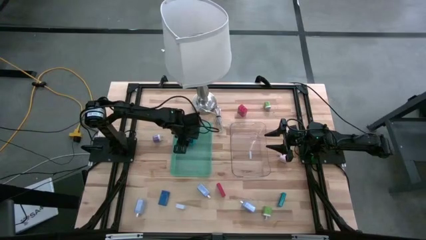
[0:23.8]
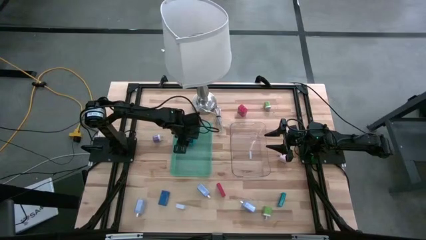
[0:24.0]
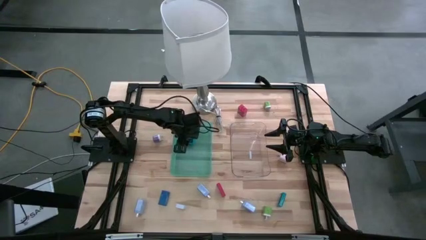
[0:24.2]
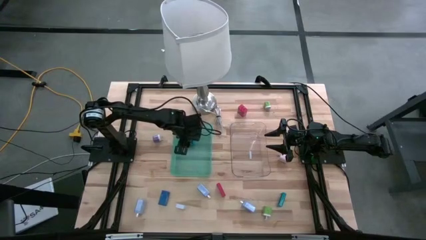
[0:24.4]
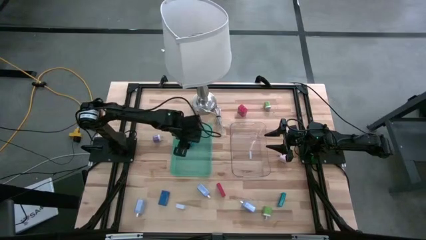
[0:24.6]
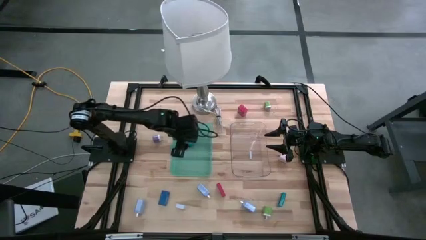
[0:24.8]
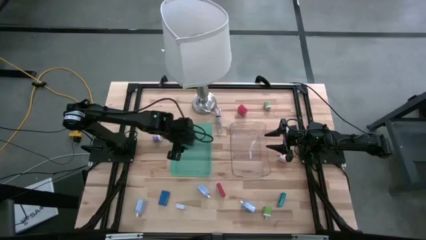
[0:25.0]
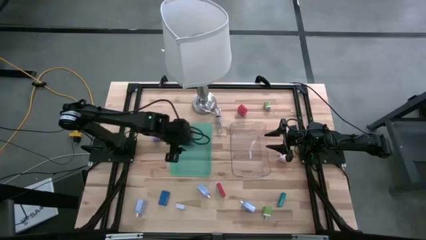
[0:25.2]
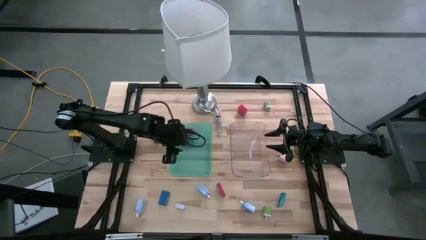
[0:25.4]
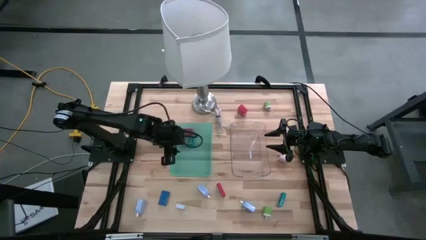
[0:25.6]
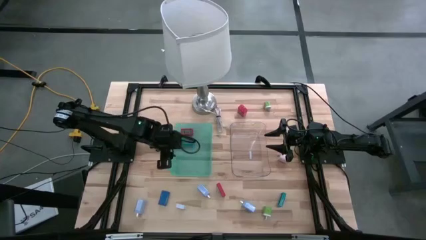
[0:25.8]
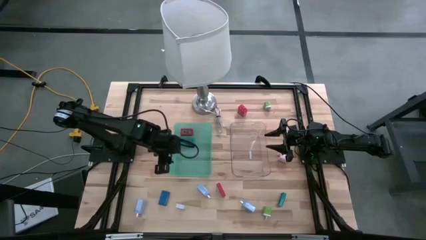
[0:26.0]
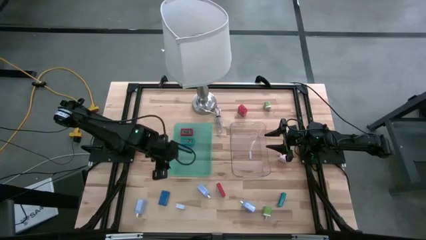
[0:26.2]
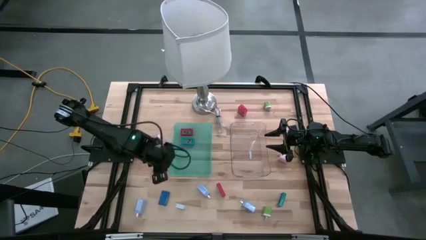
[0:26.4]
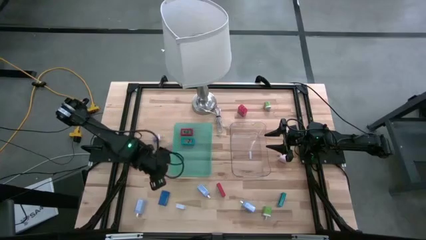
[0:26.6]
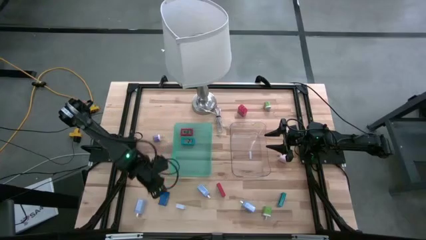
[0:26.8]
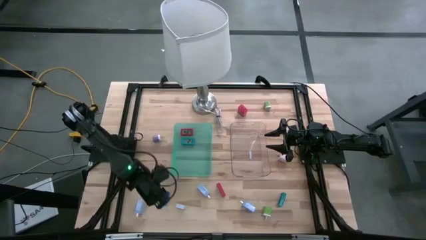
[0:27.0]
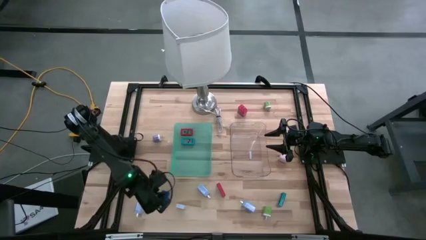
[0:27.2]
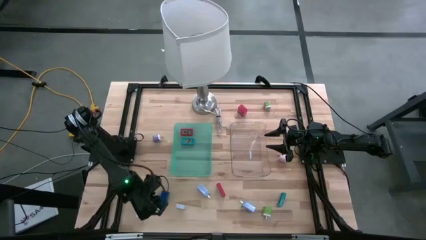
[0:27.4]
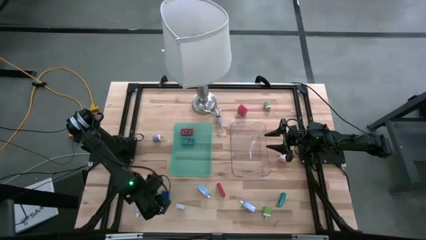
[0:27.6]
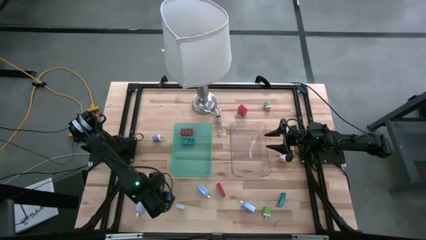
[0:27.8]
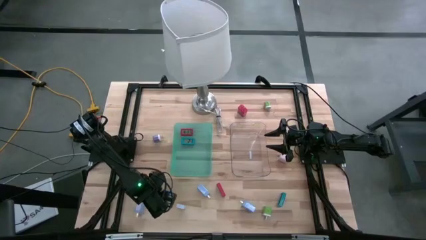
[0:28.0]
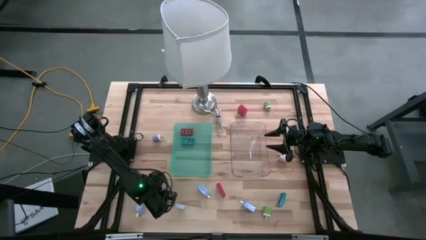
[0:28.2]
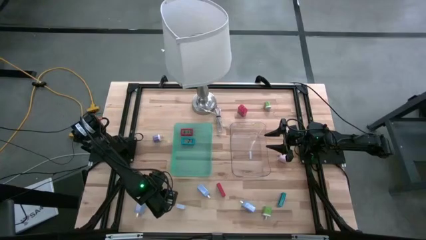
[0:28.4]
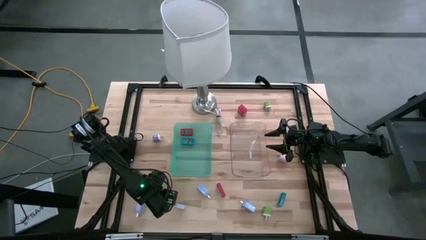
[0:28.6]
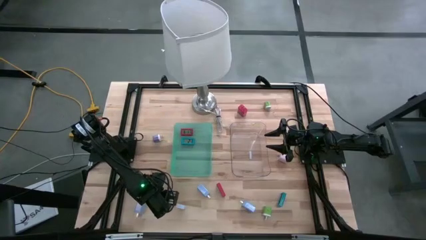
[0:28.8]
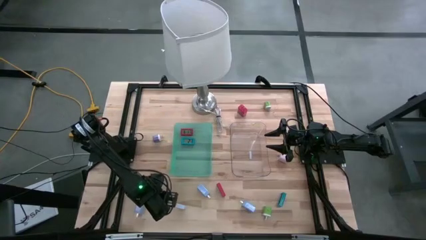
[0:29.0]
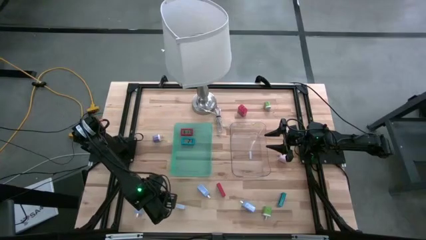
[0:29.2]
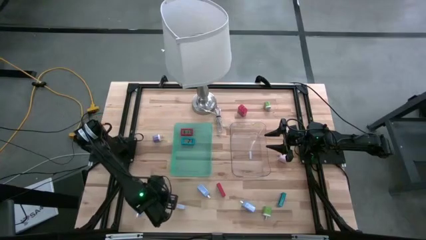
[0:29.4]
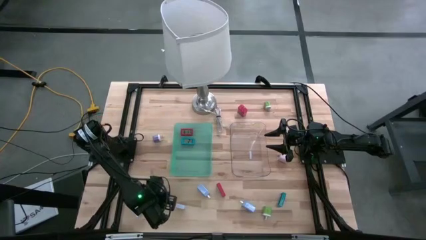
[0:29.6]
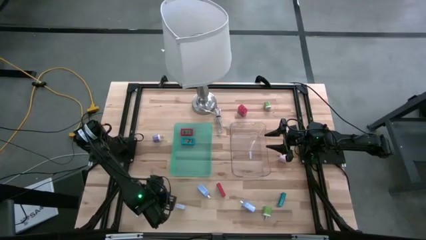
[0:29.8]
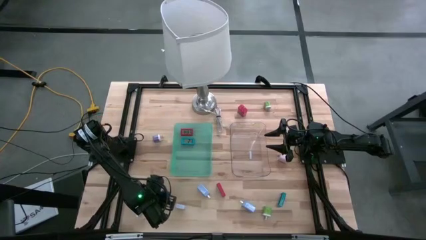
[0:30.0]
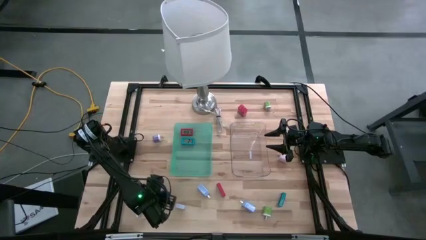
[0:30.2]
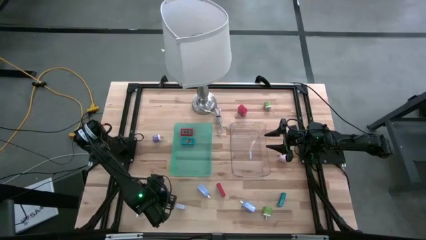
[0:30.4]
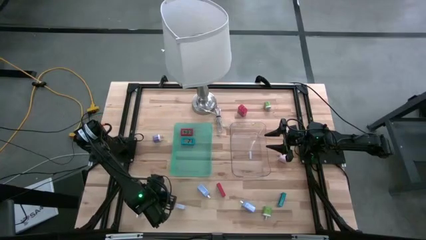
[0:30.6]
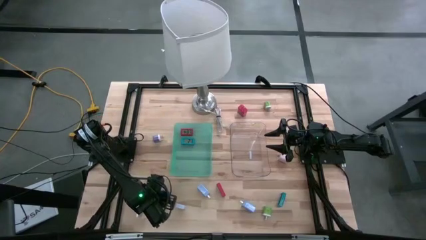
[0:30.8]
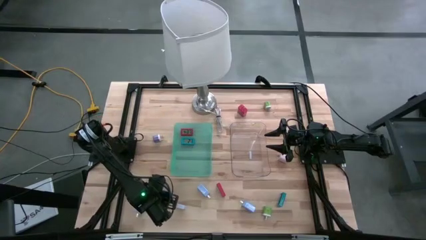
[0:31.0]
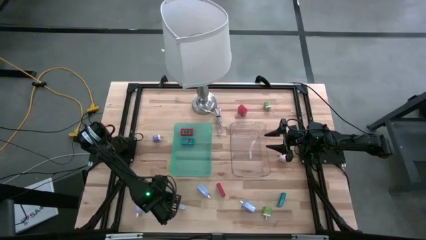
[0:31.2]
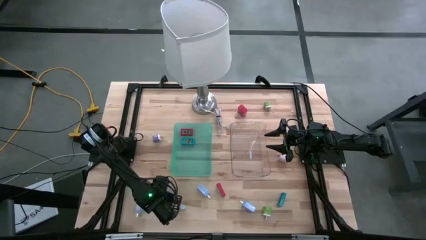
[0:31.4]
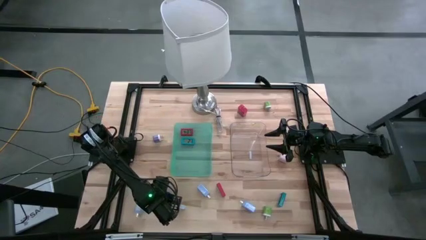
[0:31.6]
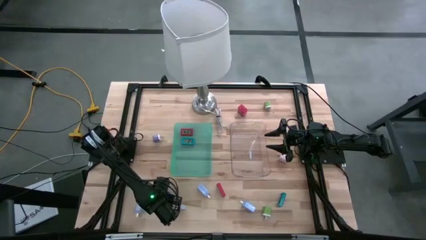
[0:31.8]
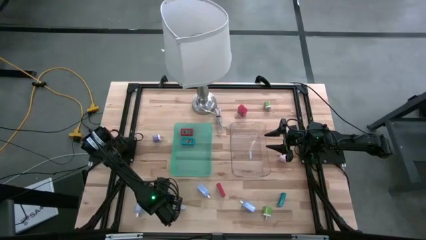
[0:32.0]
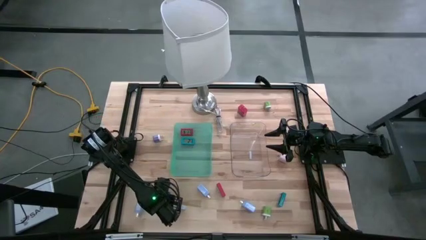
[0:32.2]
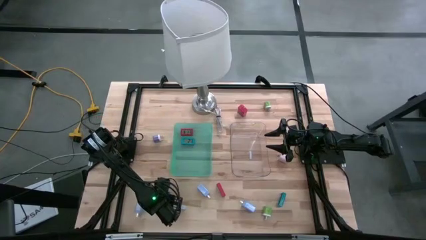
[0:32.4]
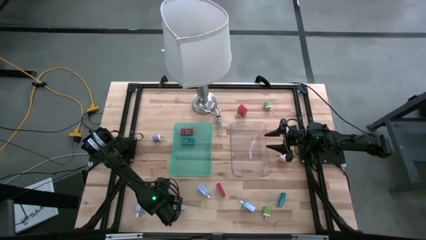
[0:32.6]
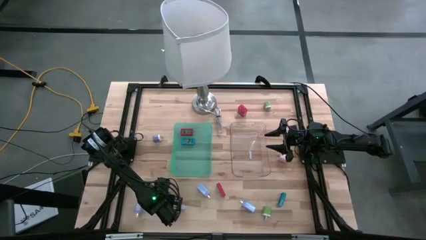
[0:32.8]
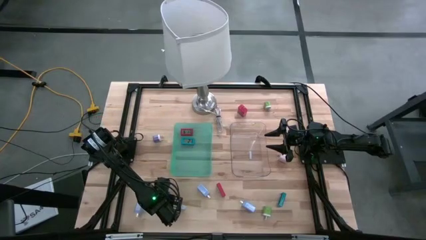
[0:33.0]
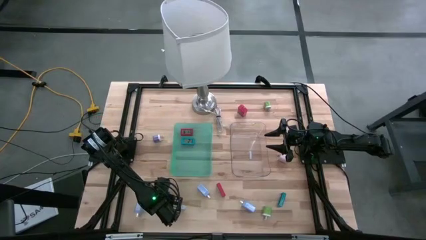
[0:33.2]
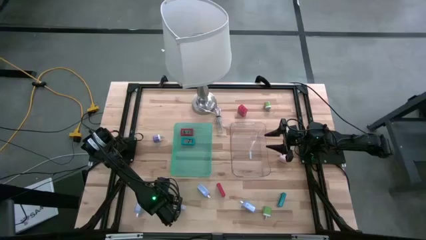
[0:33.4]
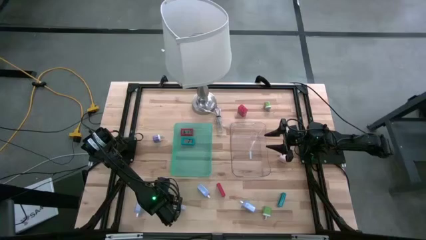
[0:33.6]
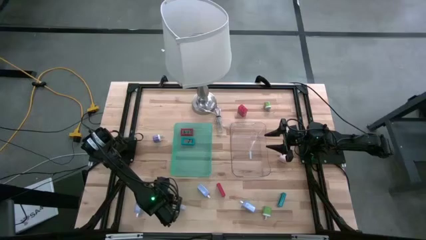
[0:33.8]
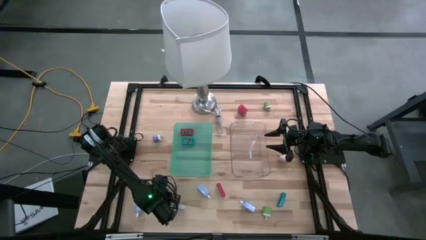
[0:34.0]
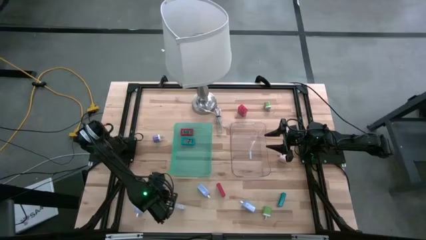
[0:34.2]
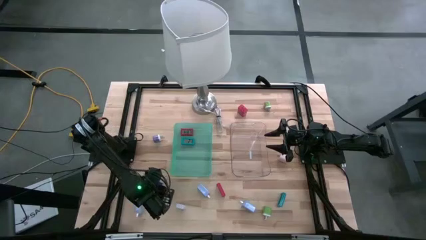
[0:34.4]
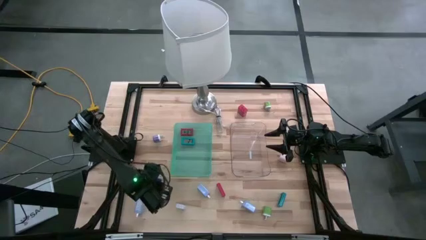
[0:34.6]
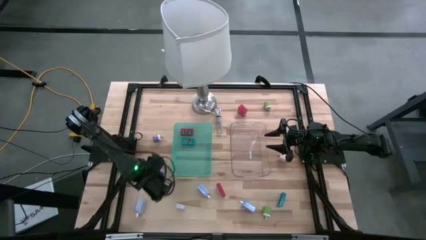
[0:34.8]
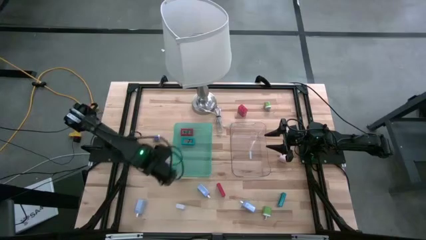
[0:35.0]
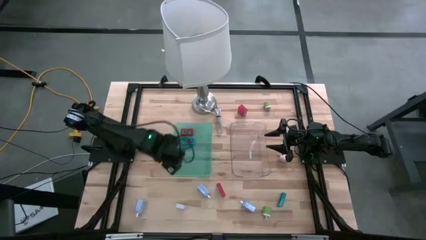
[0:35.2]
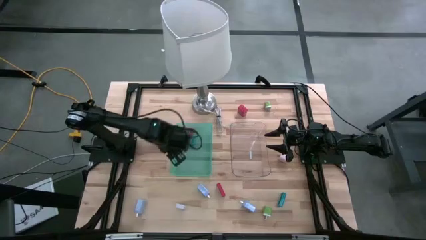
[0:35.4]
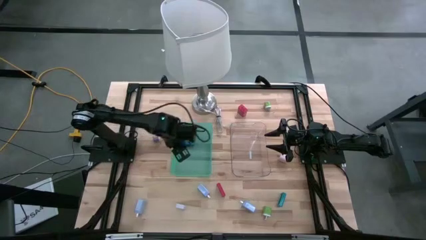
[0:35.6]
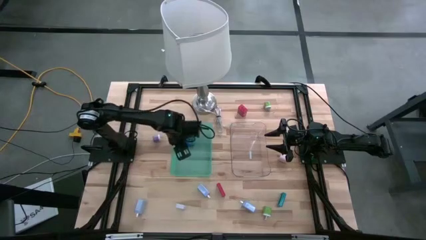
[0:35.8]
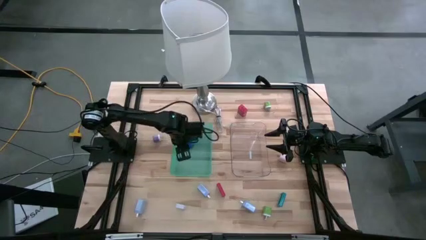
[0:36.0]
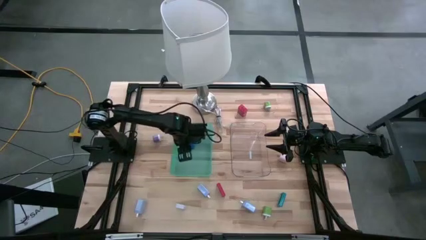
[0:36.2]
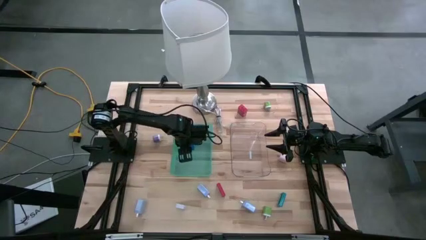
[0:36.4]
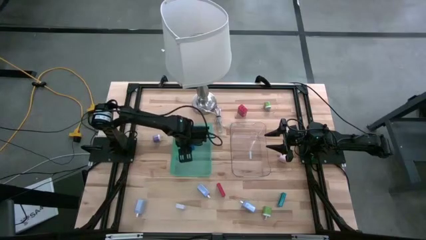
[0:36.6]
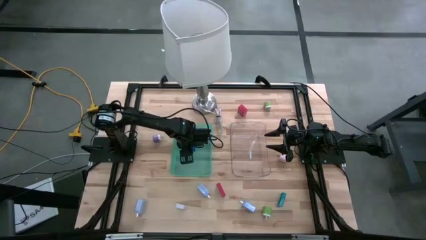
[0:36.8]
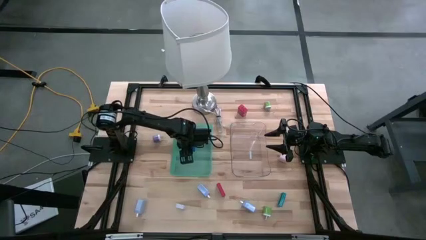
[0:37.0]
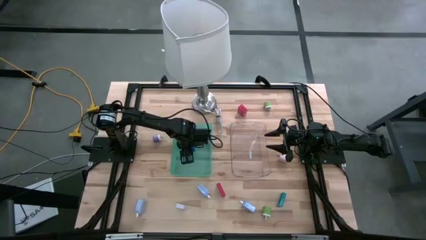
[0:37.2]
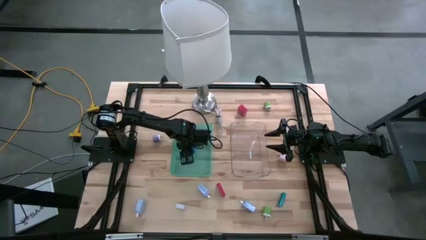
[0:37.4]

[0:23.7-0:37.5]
Task: Pick & Place Office items
Put the blue digital clock into the green bin
